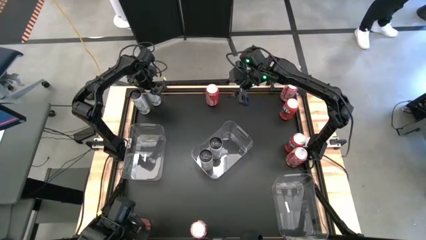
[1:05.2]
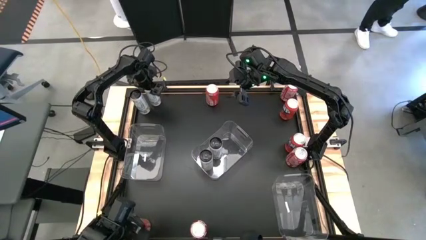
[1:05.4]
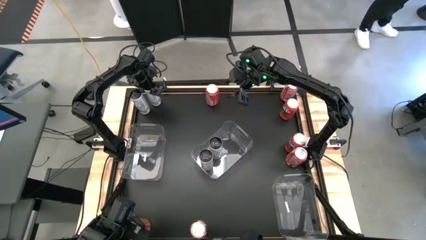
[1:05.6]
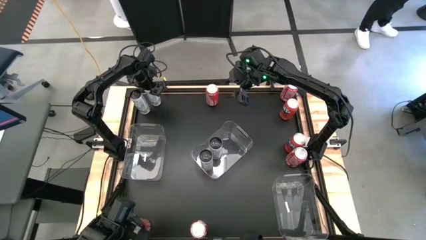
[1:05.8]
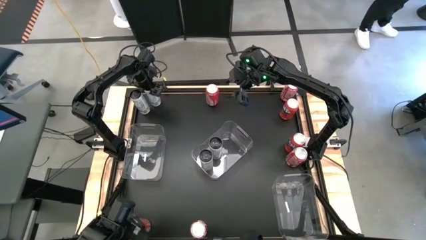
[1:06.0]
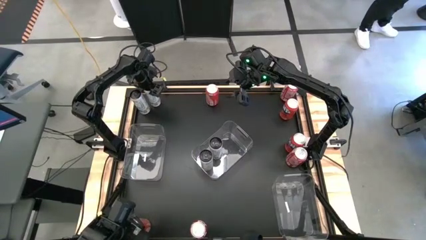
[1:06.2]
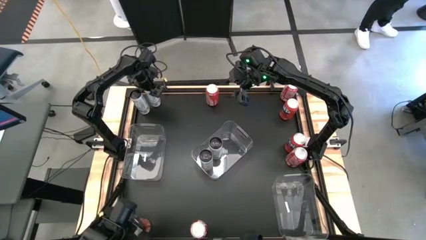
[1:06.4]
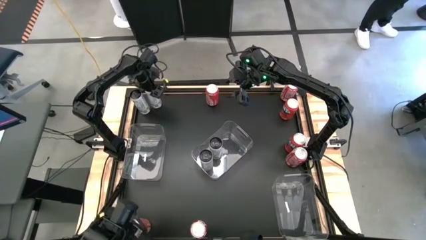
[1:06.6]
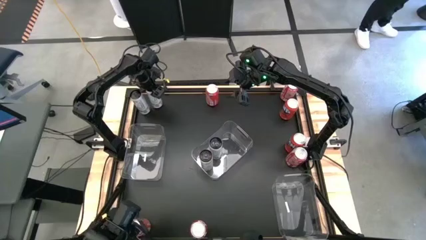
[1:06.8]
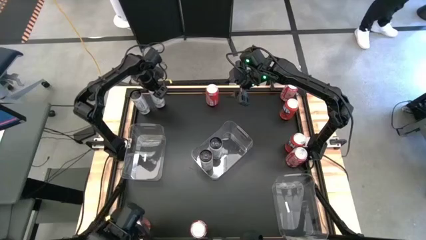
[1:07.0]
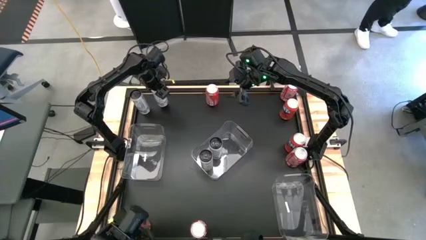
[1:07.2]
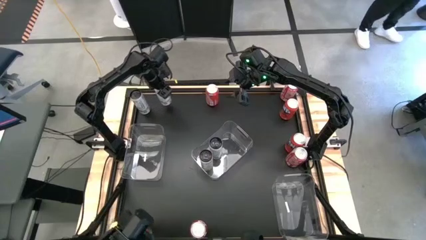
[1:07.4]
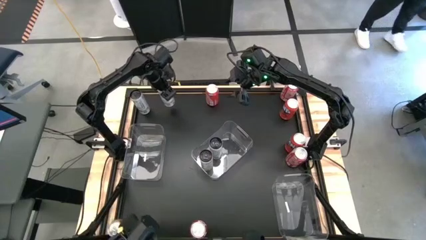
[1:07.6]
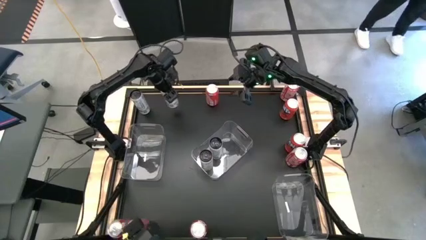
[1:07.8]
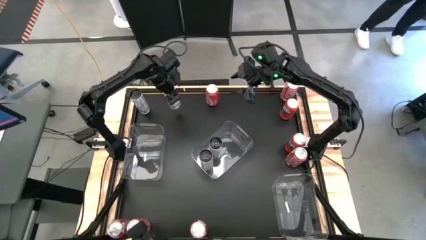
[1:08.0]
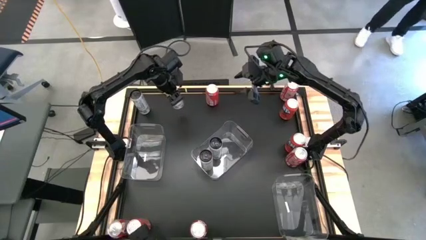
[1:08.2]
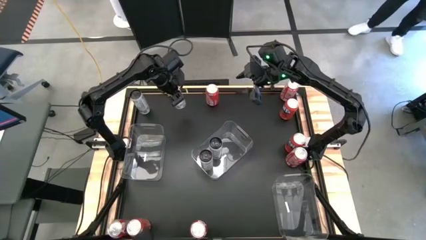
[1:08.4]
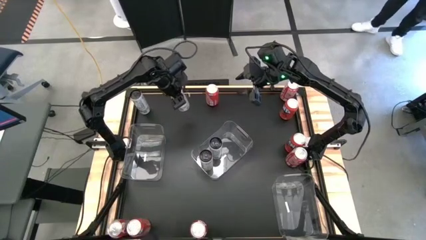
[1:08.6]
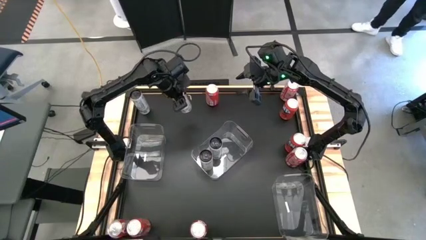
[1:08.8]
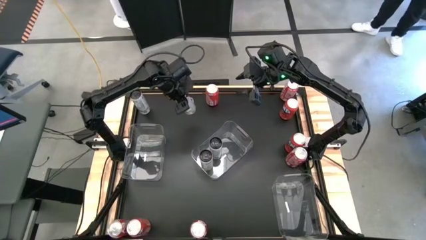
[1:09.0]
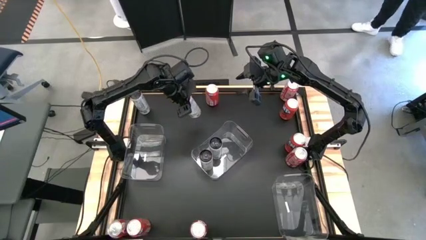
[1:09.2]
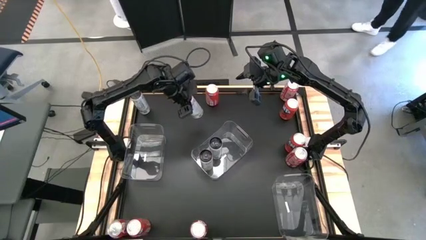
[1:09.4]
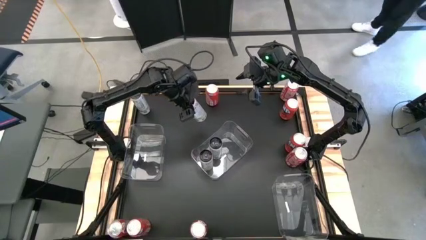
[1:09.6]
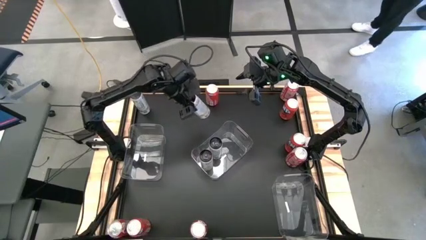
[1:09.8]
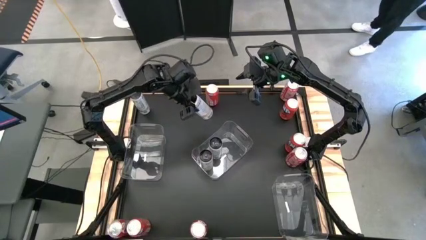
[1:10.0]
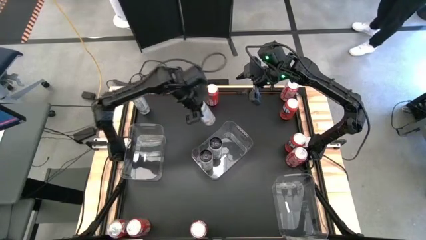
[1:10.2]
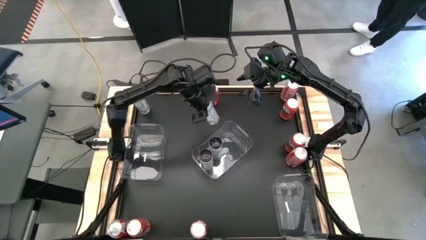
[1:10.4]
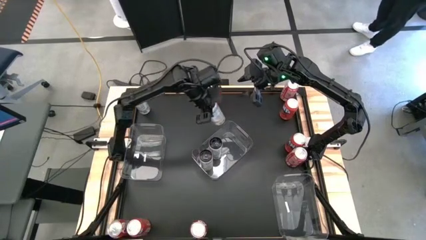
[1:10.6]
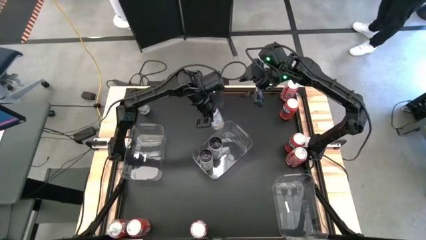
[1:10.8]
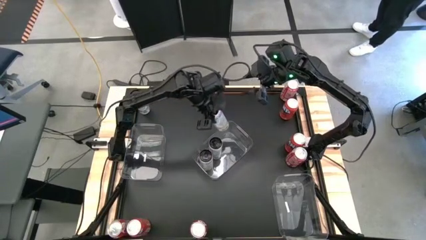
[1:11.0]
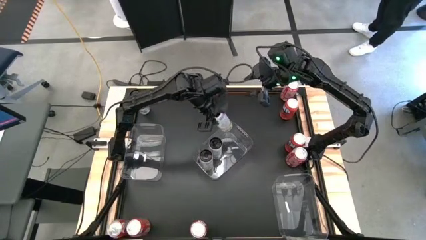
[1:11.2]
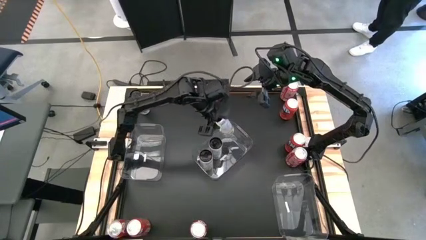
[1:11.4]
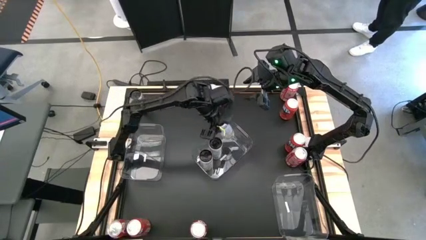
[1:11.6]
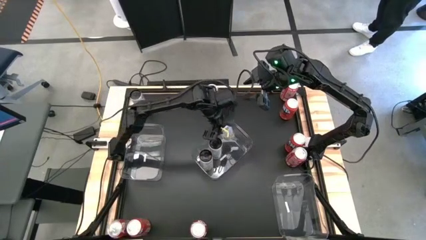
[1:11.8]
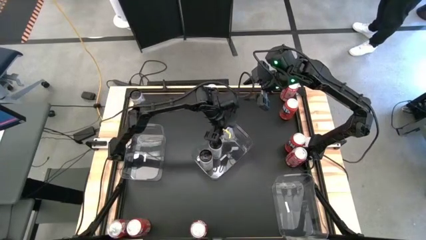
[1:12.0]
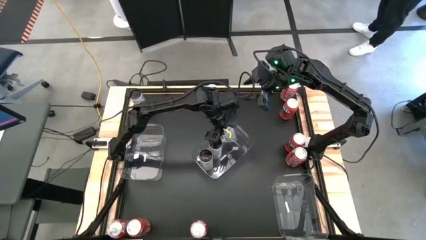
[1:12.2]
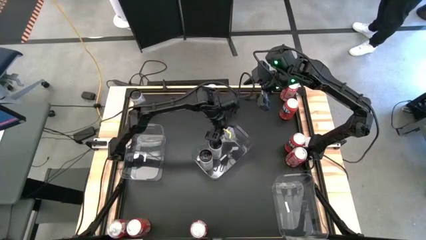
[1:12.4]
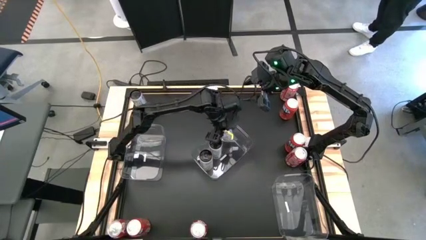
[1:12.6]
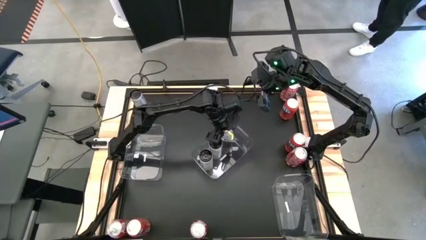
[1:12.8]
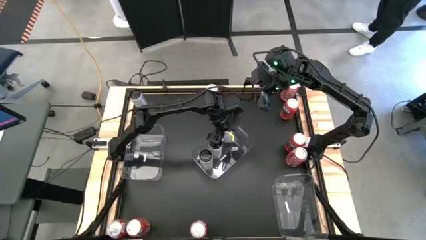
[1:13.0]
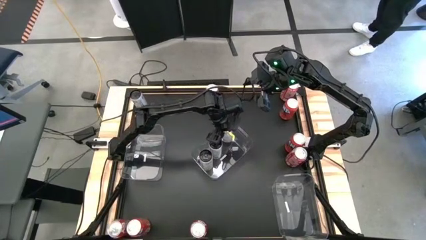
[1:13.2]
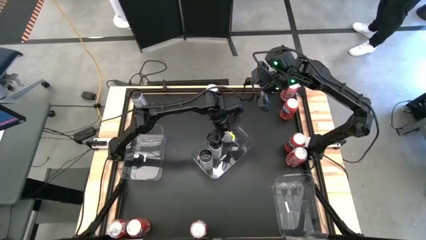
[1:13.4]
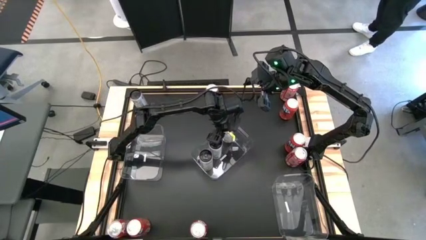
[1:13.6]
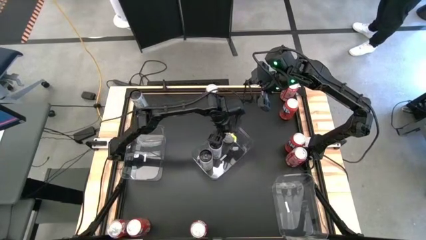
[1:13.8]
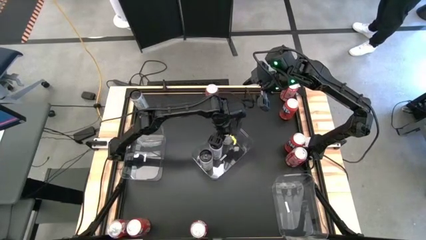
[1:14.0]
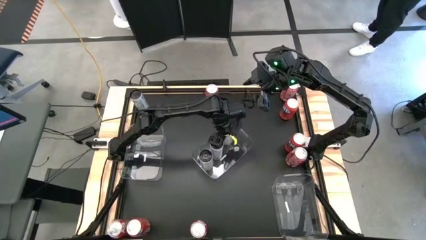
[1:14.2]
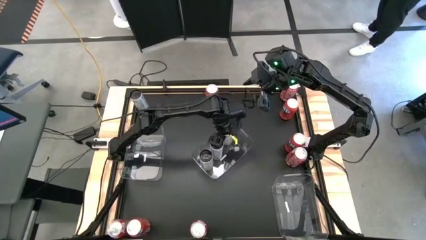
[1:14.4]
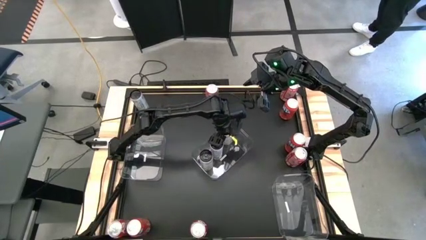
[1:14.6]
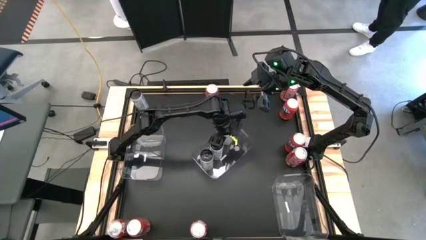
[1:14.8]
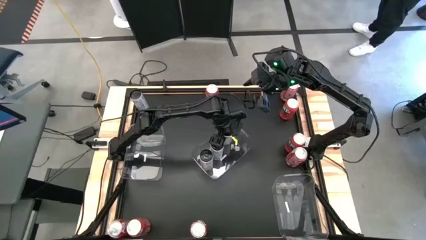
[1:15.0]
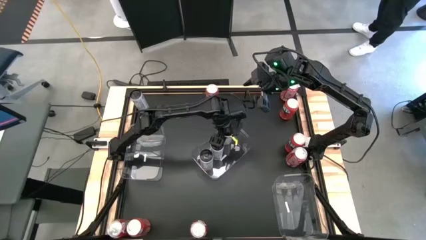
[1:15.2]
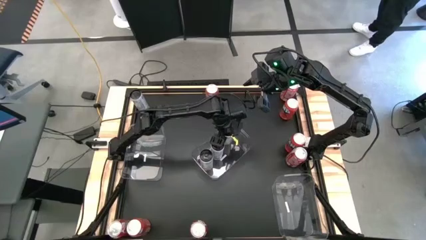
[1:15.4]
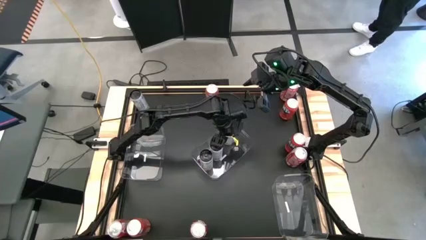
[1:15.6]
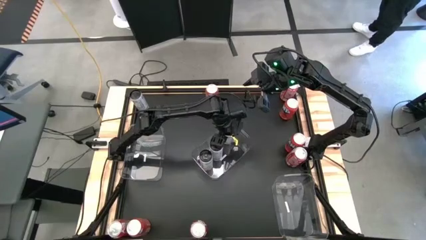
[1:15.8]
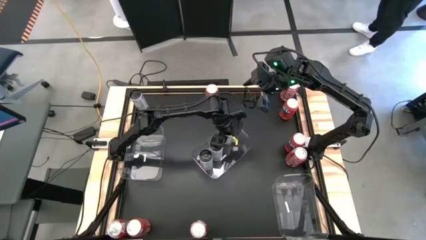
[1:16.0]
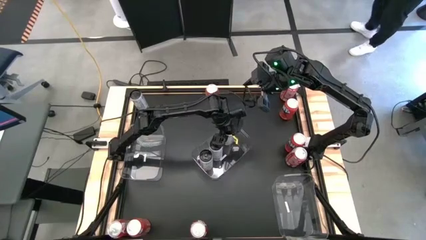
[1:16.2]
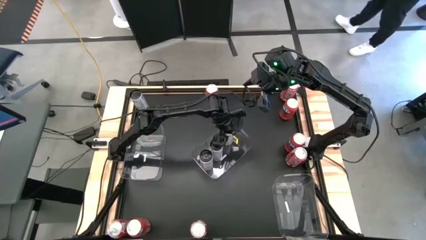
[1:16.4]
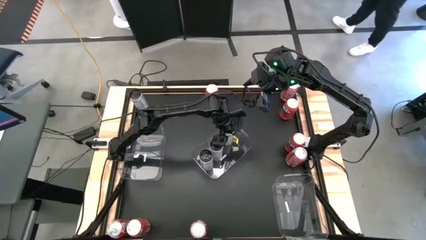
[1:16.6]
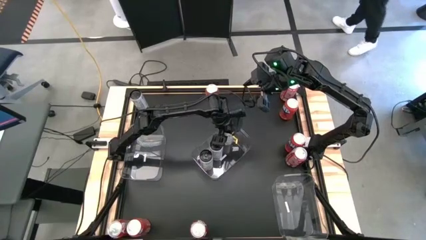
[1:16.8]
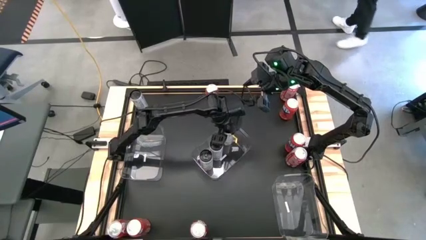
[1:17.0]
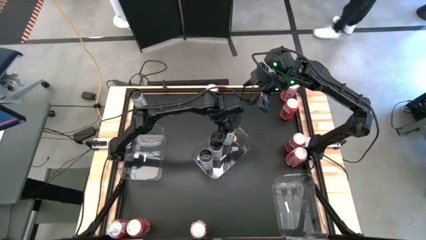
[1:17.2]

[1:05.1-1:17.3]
Task: Sort soda cans
Put the white soda can into the middle transparent bin

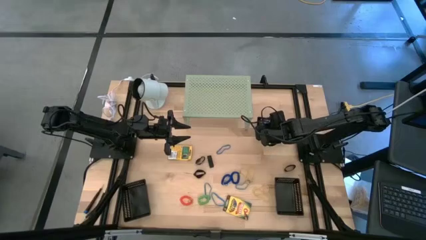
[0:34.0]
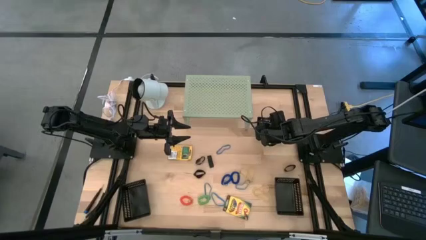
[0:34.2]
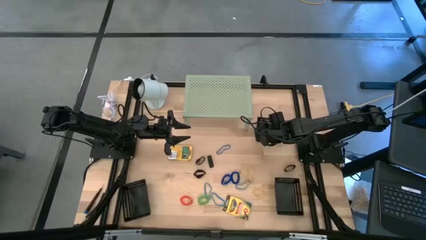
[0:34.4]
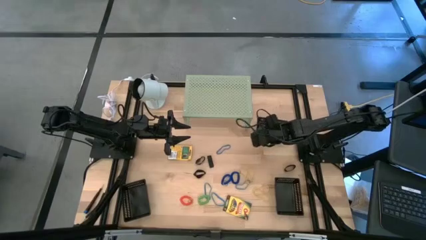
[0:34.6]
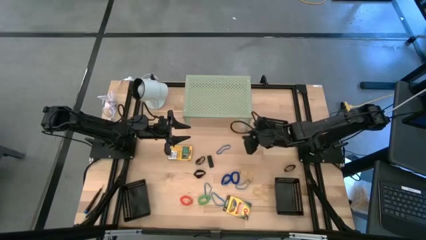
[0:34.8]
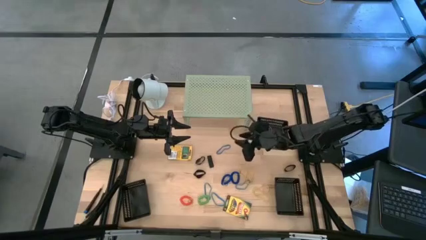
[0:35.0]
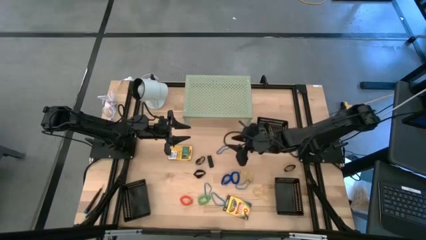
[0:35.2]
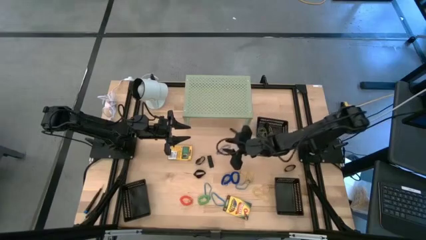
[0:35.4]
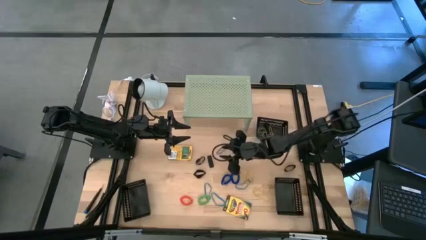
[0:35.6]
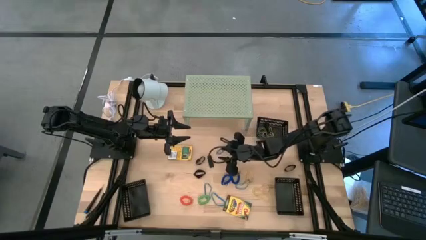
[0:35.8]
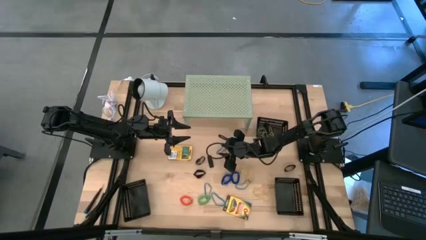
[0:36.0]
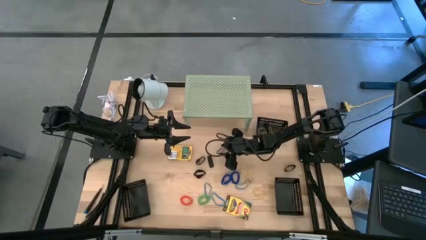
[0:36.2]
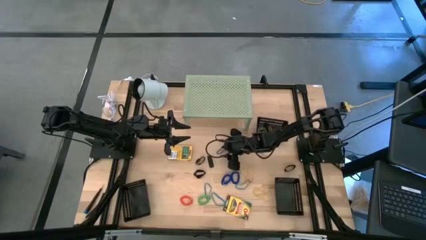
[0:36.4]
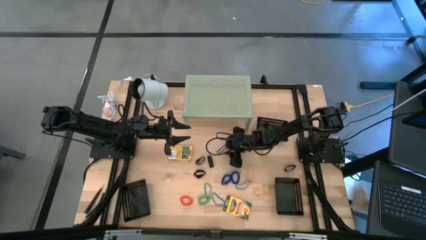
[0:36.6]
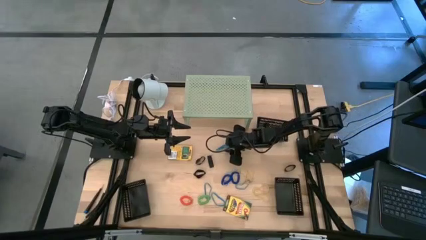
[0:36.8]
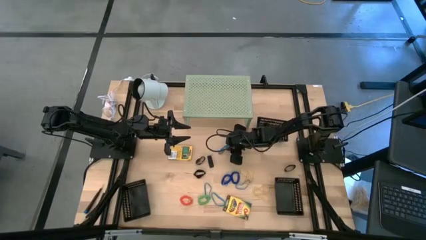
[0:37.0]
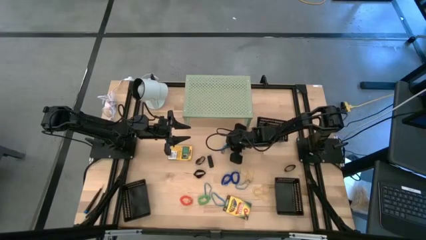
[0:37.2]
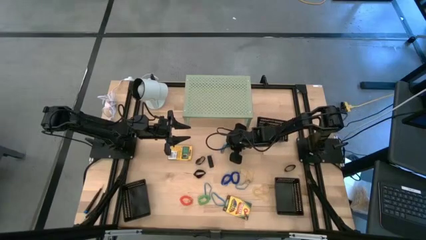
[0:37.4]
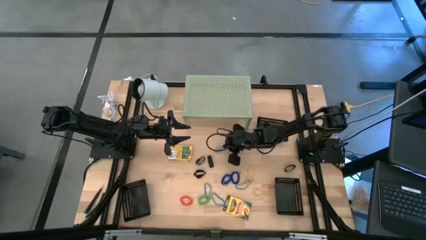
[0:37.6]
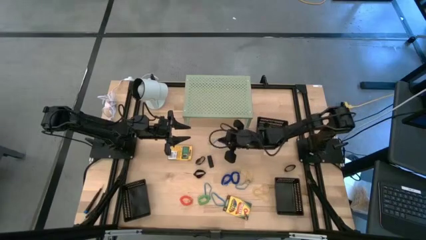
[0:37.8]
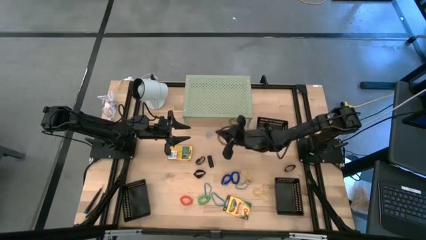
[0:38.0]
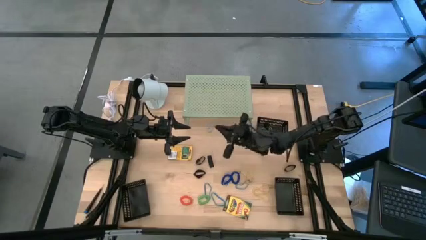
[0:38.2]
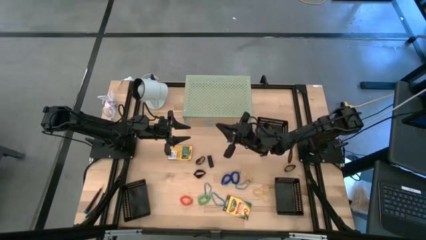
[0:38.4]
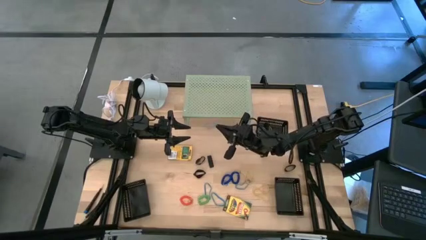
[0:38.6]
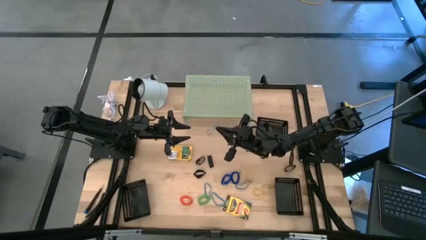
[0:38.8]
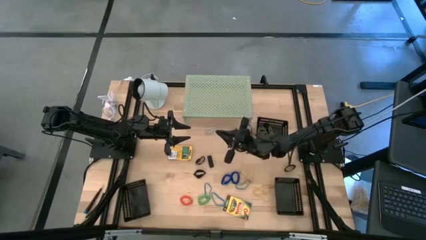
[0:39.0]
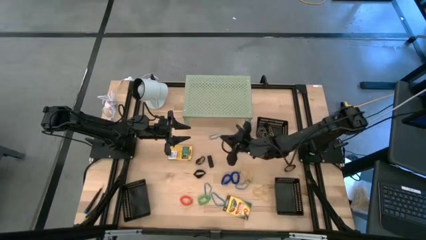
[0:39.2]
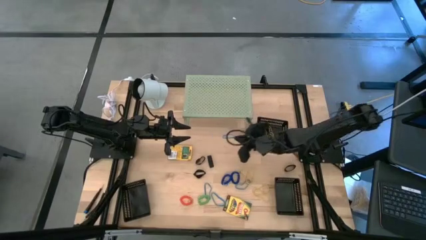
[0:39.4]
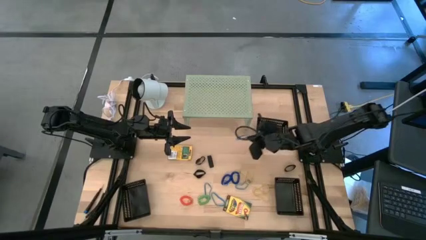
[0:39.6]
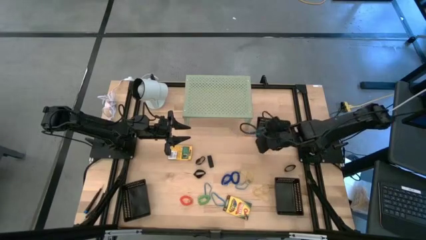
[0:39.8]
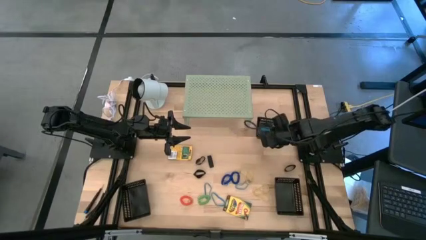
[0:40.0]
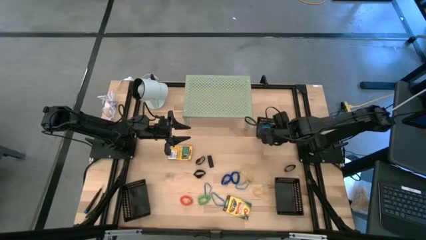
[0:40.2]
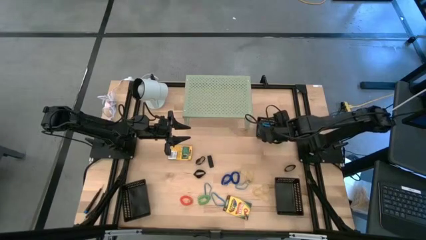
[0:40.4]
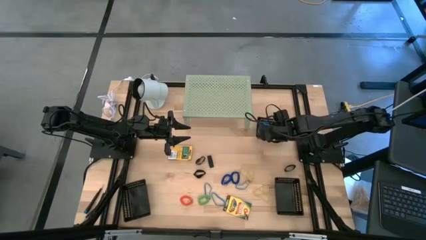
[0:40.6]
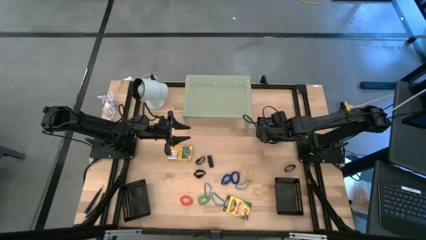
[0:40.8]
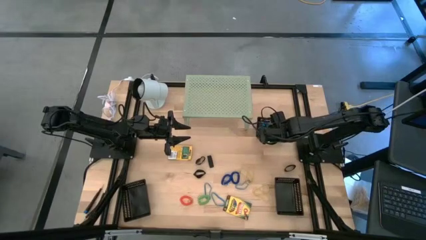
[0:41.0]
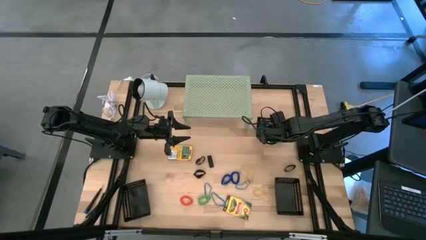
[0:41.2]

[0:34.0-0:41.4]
Task: Pick & Place Office Desk Supplies
Put the blue rubber band into the top right black bin
